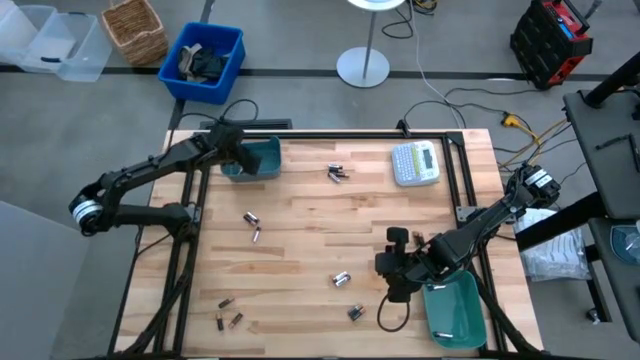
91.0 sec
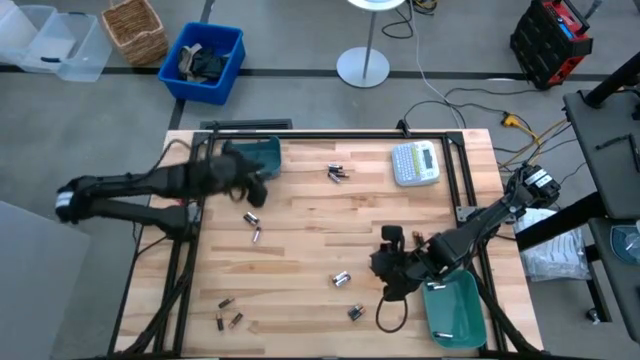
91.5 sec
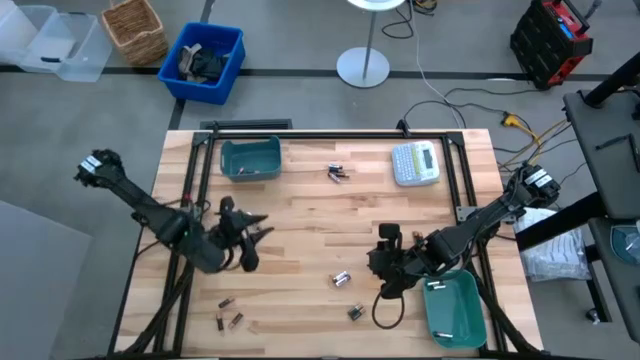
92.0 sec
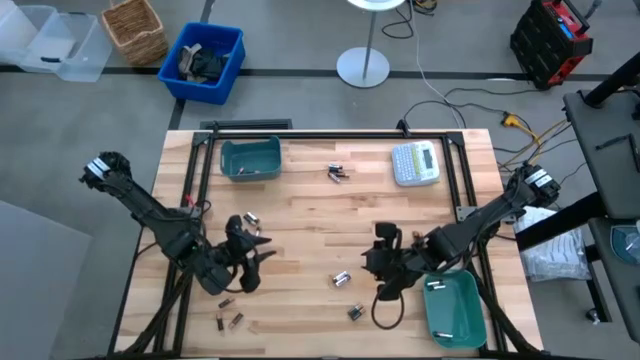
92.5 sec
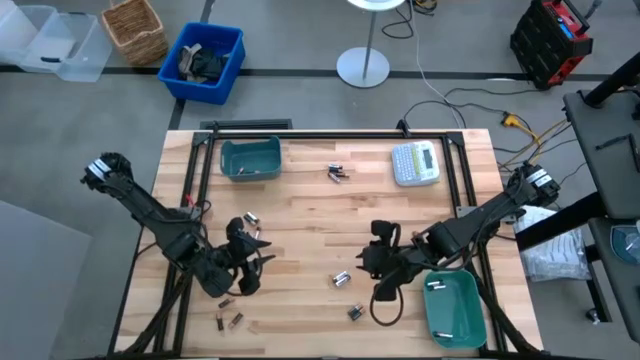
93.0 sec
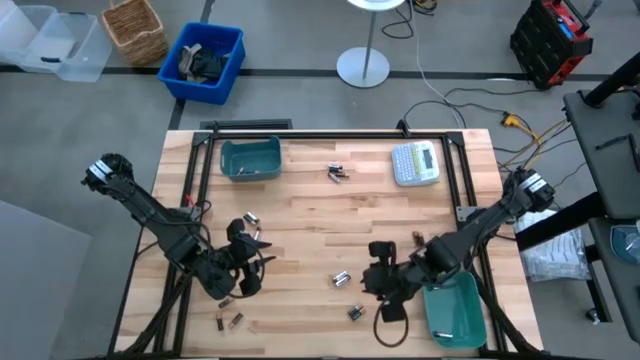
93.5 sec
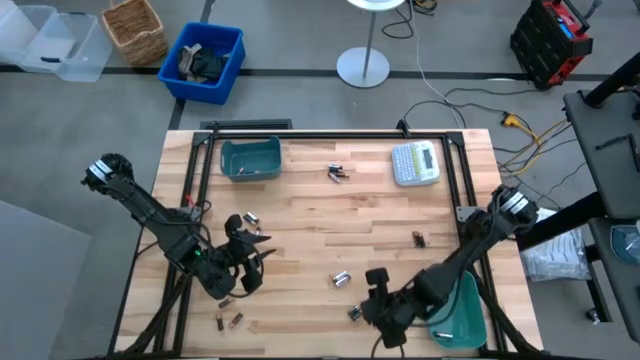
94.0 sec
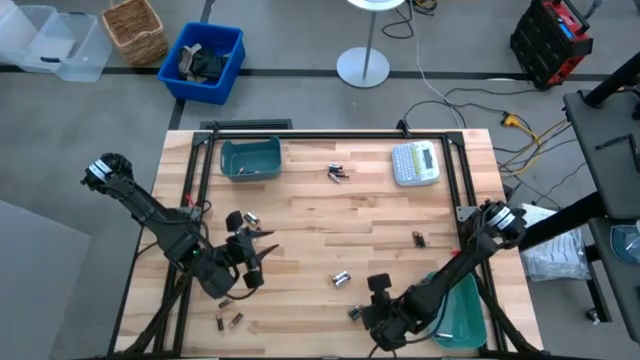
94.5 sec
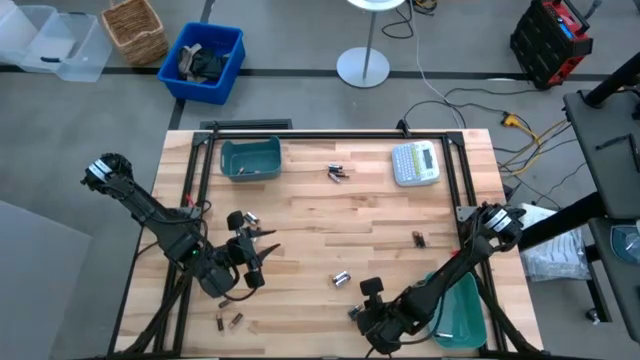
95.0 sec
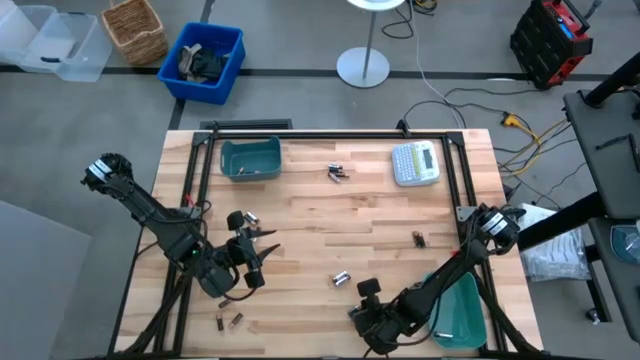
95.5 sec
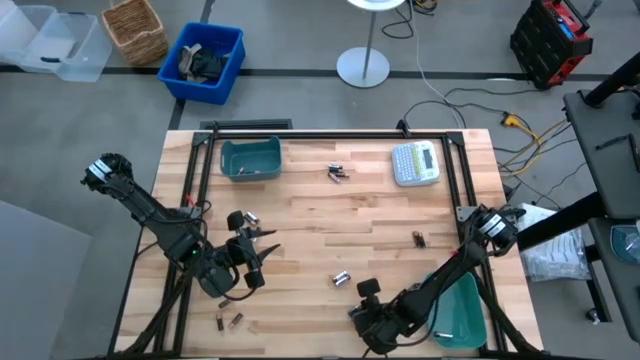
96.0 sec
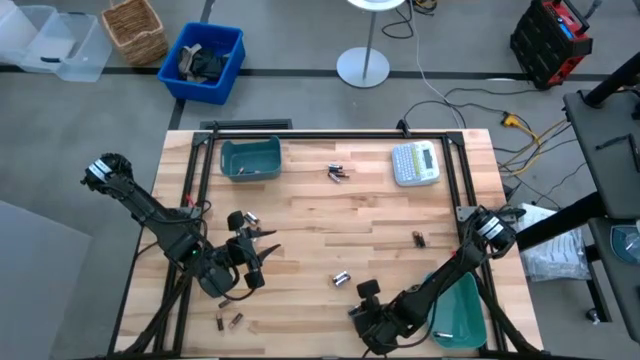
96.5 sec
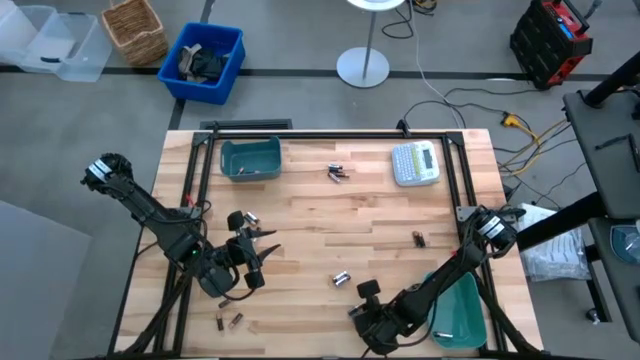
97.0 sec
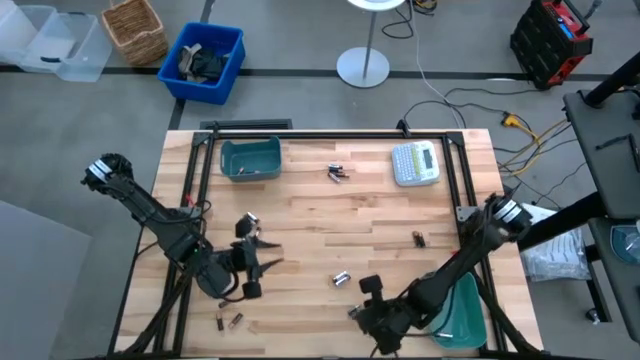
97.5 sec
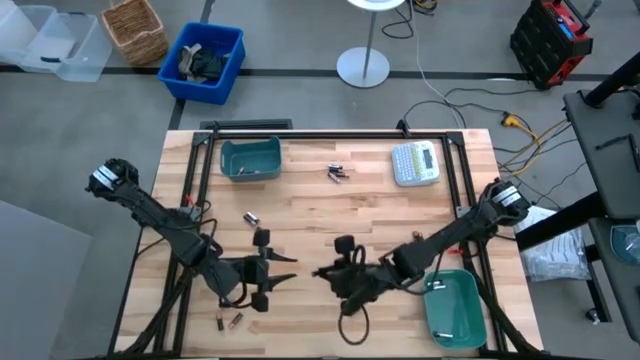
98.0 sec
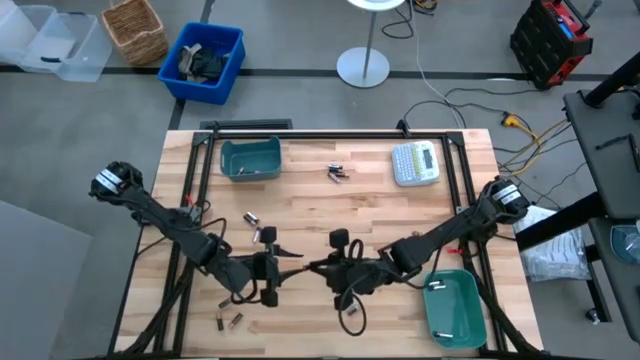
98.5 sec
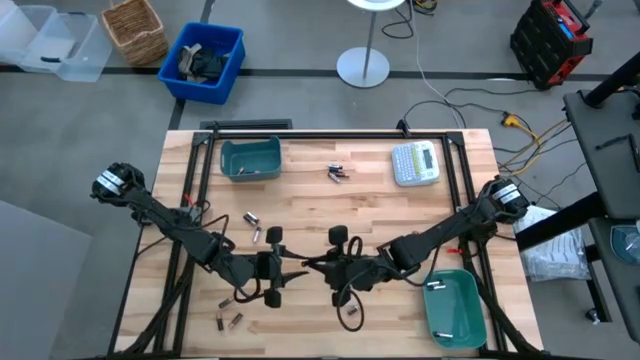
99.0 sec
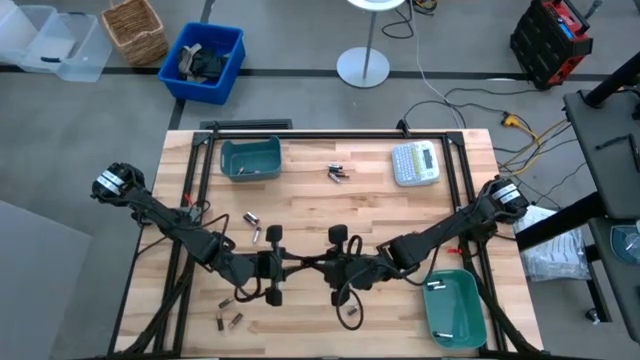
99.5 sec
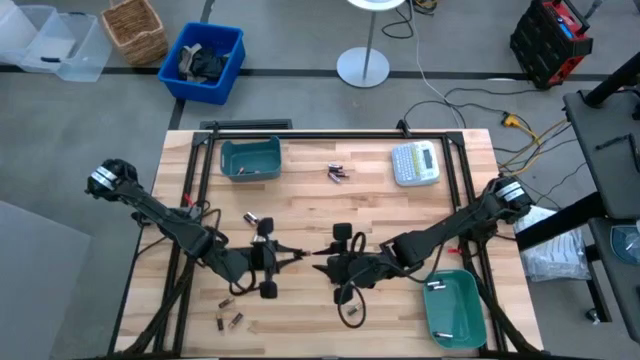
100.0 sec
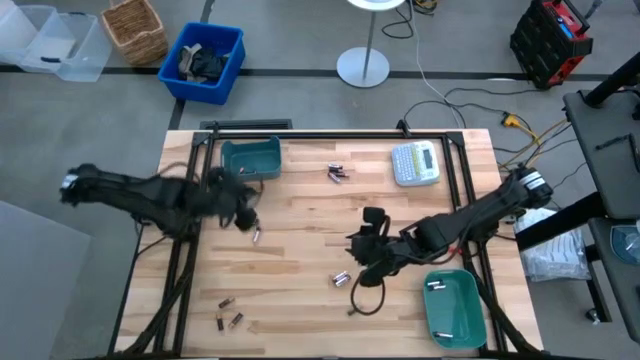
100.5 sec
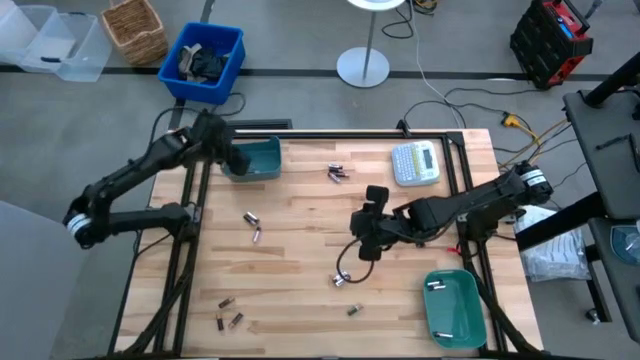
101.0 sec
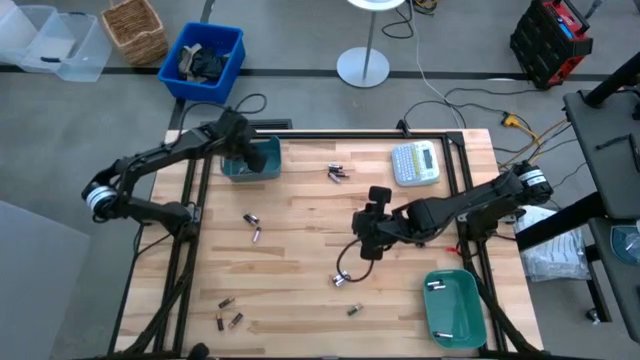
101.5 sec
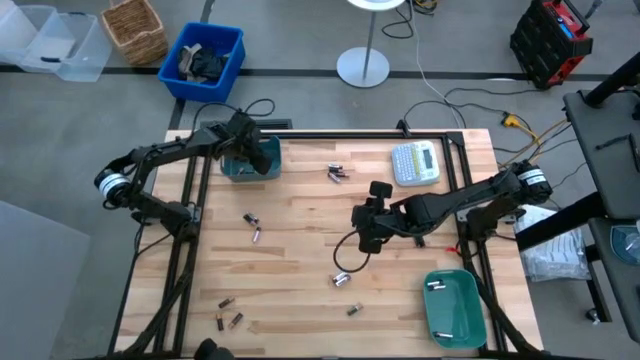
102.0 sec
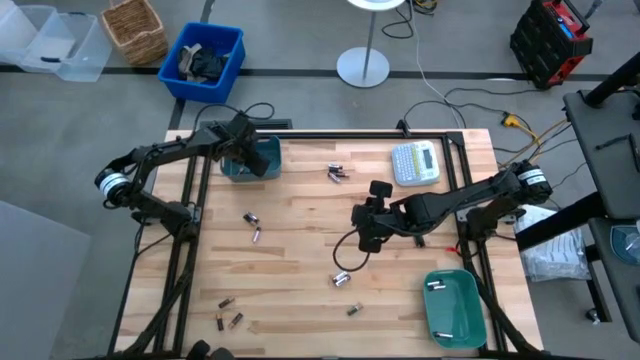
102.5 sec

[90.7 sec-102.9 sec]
Task: Sort batteries
Put the black battery into the blue bin

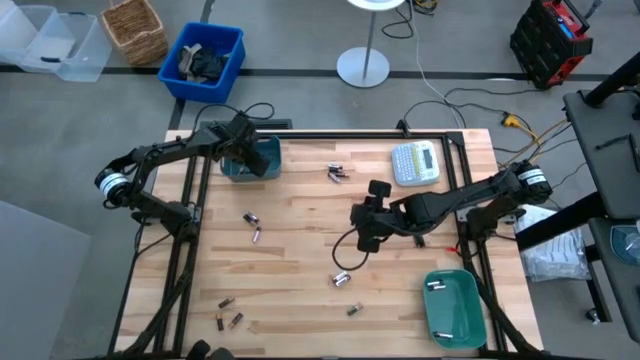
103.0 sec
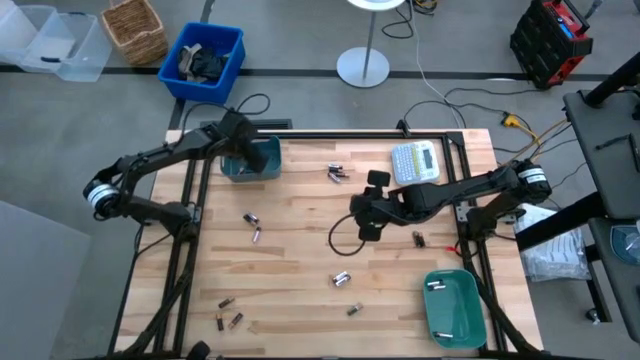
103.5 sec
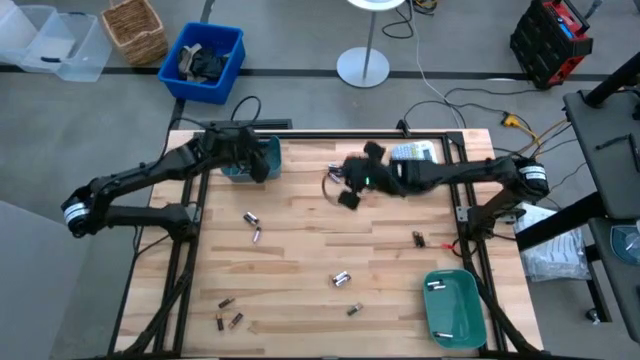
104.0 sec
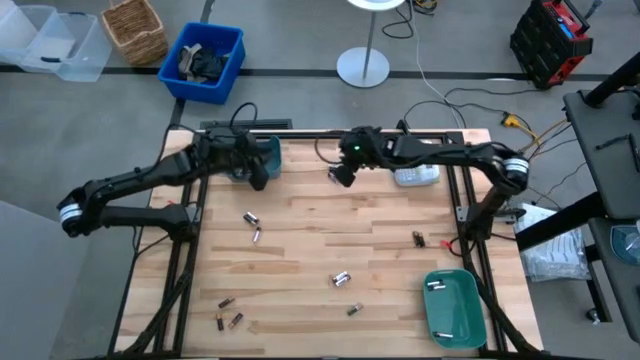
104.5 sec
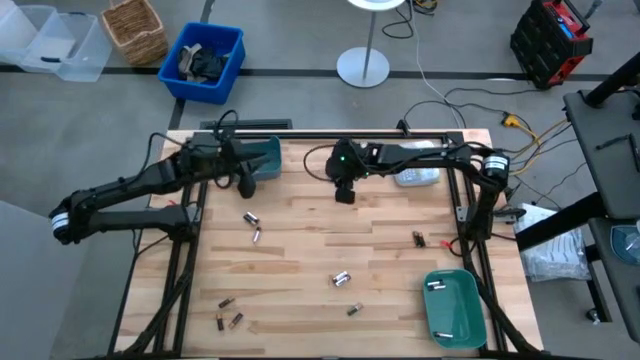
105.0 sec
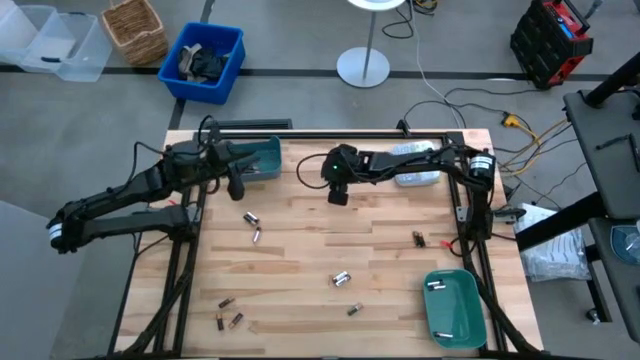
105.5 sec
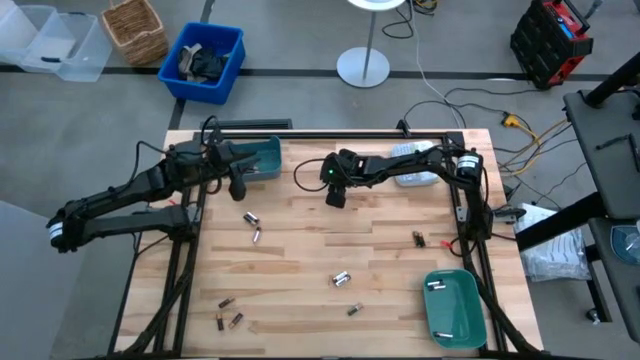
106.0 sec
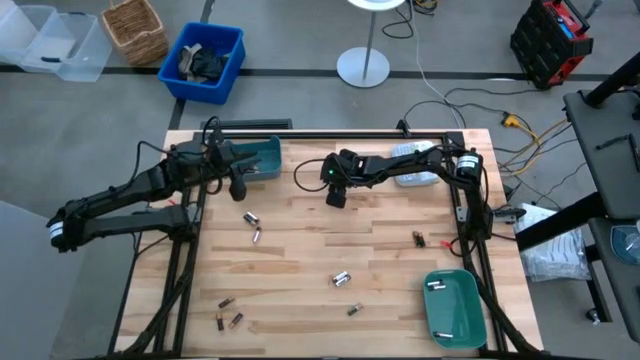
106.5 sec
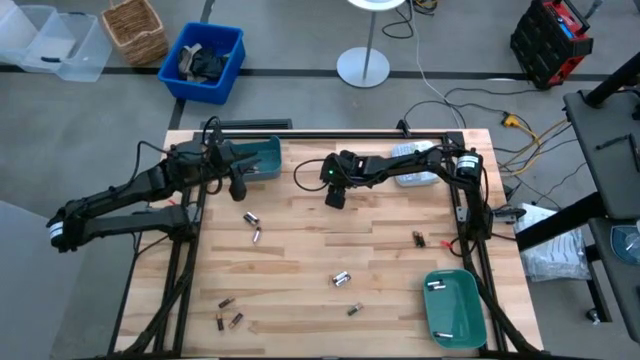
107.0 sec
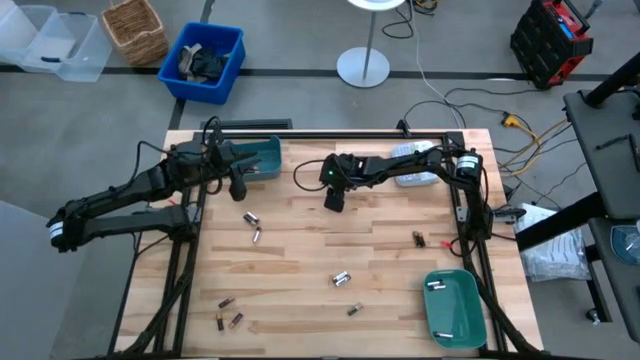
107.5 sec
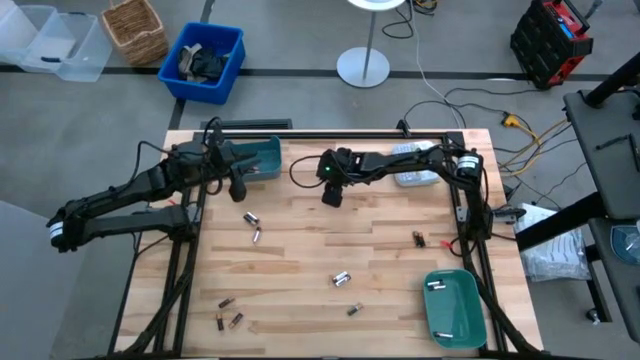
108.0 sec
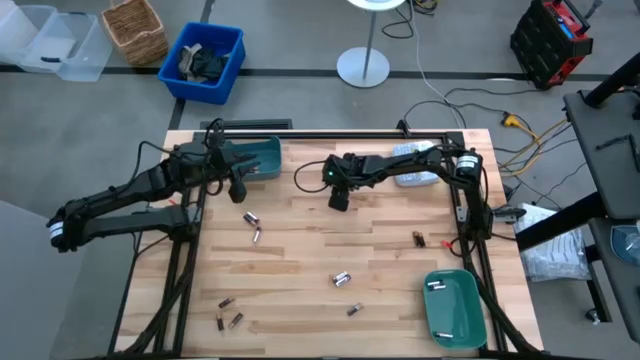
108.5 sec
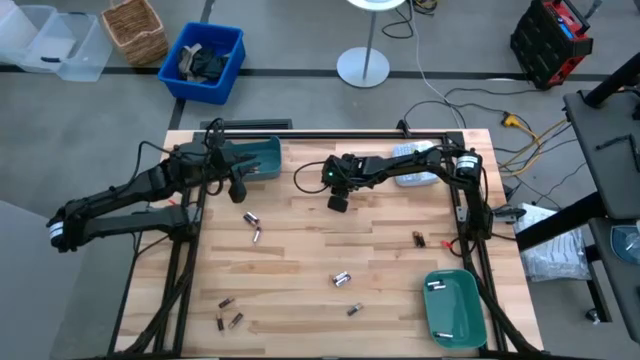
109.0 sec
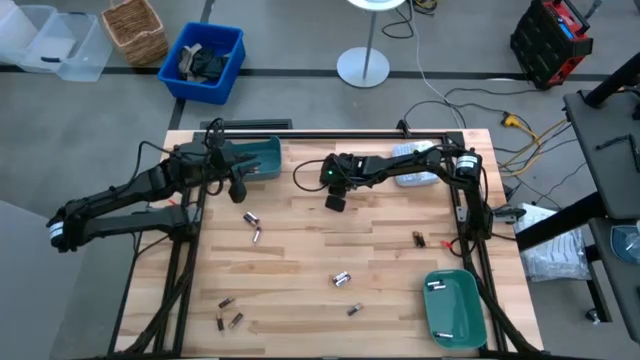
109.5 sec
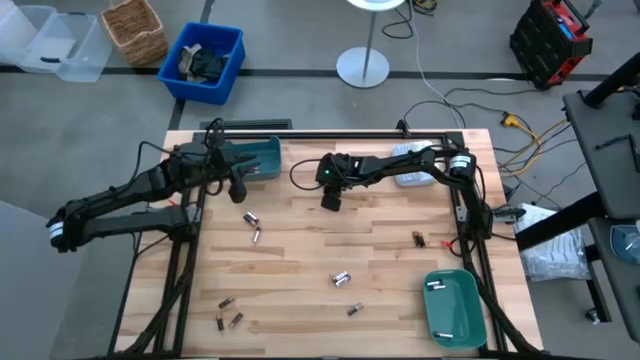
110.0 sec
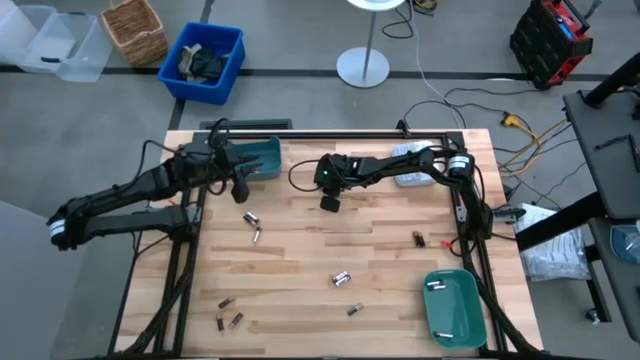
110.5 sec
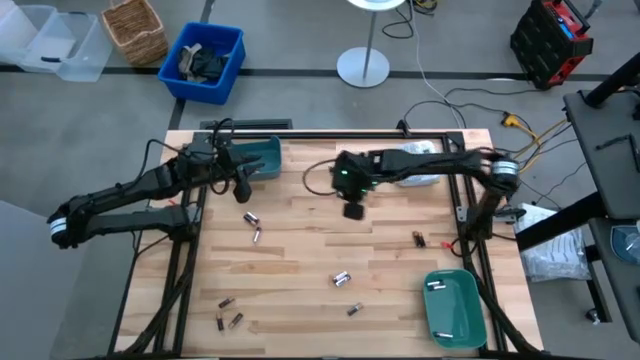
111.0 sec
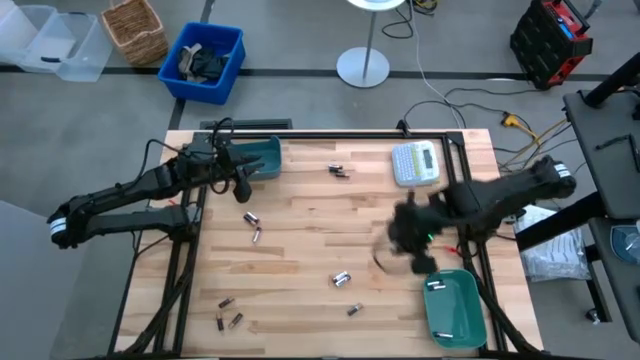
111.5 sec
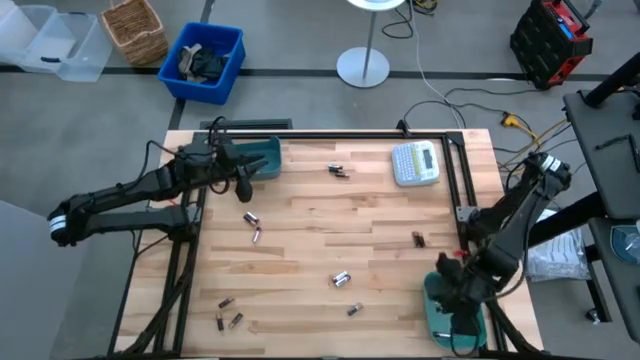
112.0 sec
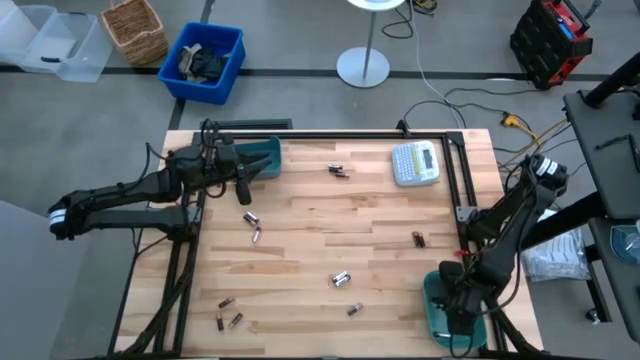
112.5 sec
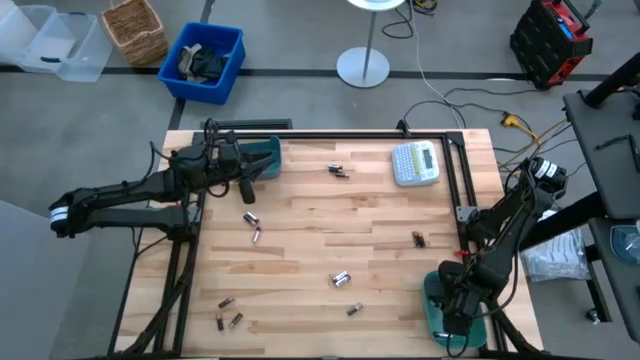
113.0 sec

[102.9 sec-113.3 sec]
Put the silver battery into the green bin
